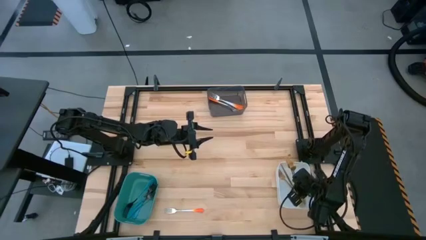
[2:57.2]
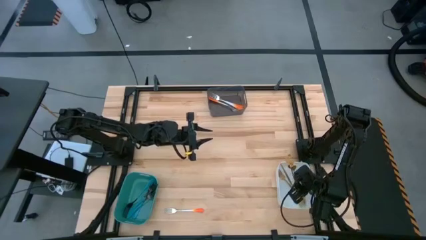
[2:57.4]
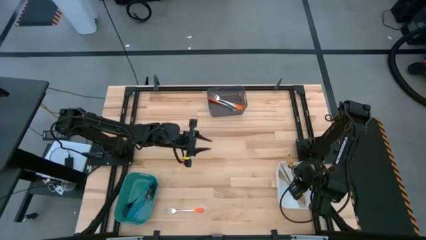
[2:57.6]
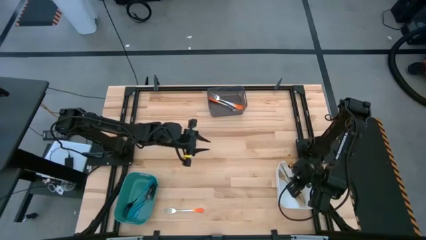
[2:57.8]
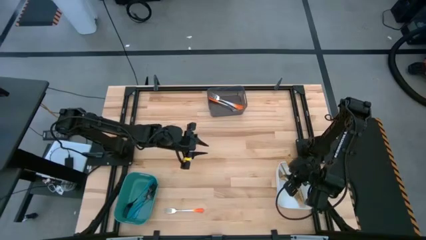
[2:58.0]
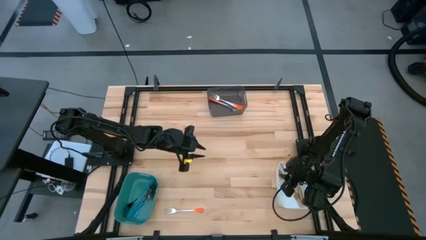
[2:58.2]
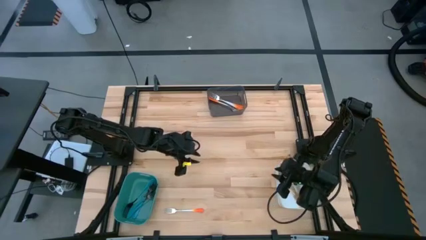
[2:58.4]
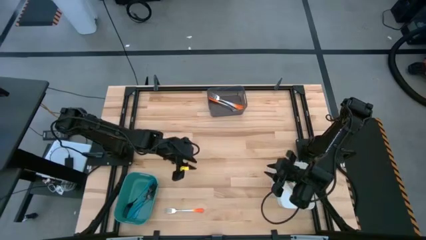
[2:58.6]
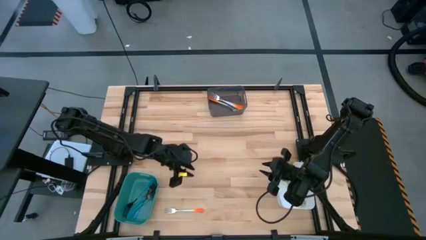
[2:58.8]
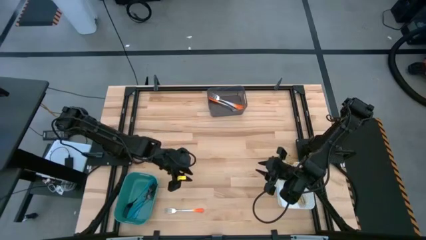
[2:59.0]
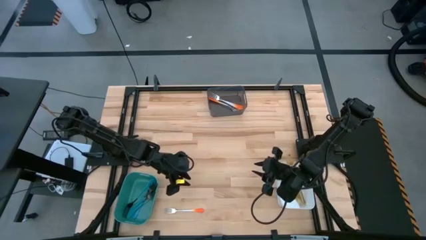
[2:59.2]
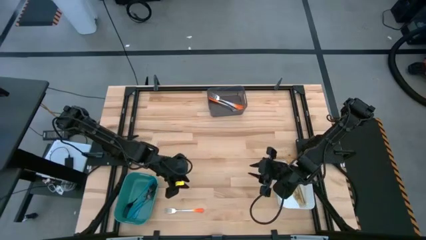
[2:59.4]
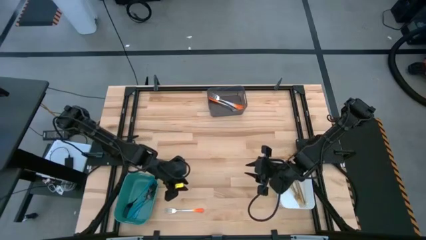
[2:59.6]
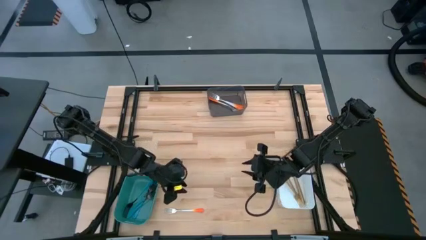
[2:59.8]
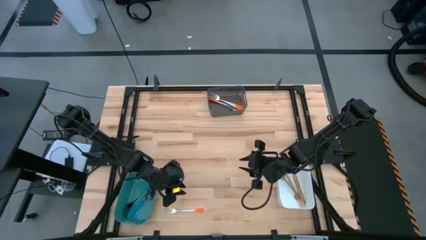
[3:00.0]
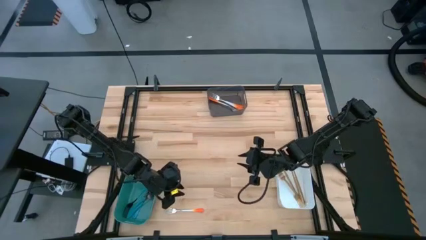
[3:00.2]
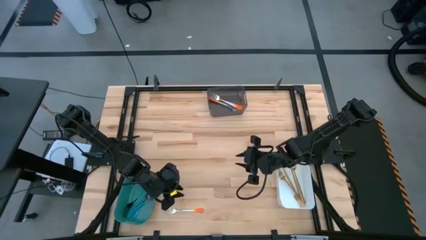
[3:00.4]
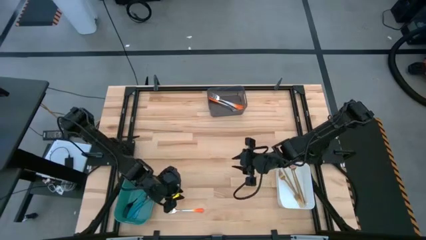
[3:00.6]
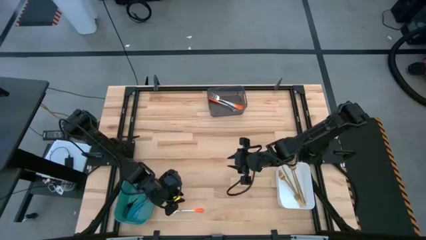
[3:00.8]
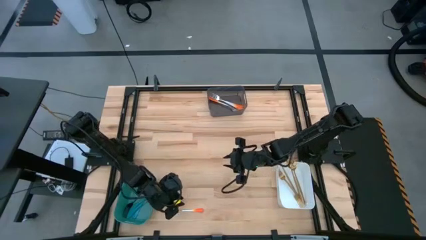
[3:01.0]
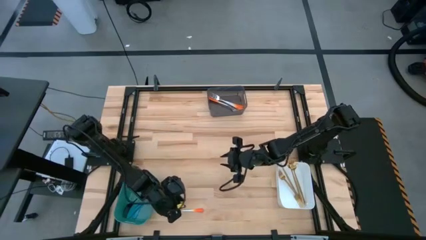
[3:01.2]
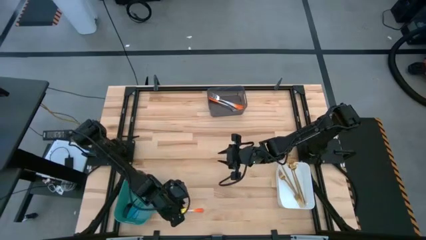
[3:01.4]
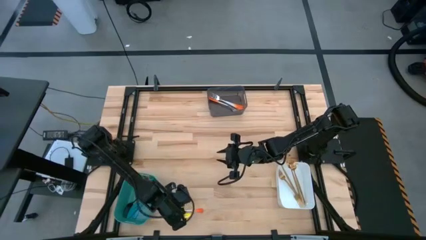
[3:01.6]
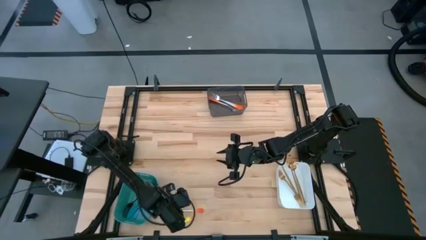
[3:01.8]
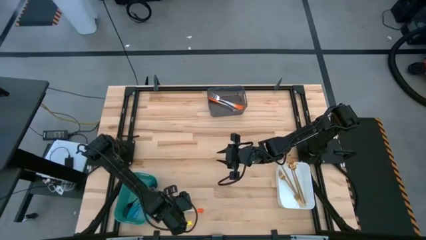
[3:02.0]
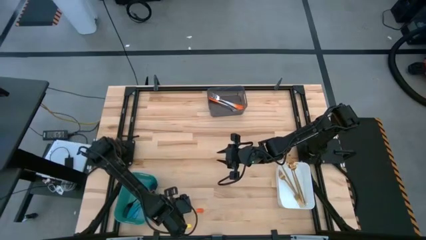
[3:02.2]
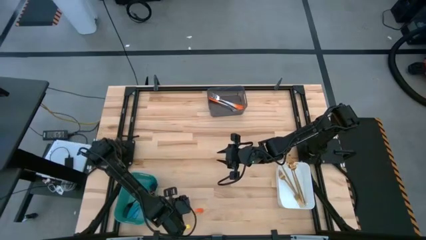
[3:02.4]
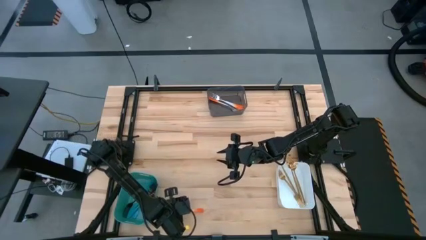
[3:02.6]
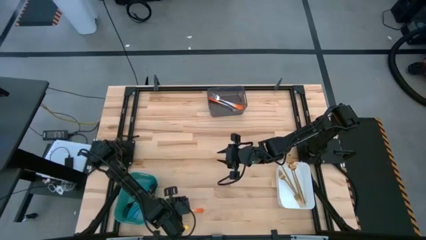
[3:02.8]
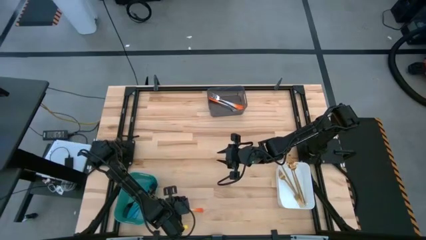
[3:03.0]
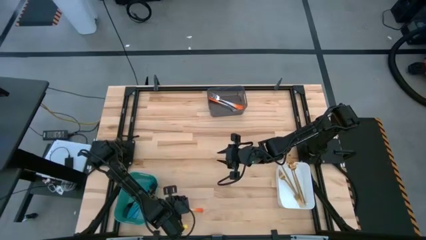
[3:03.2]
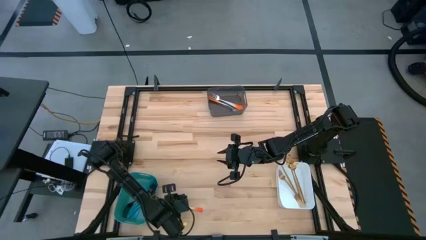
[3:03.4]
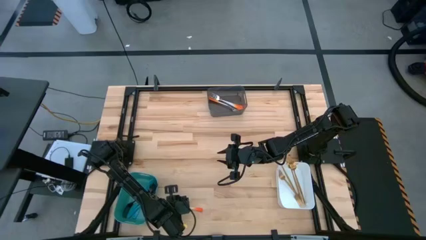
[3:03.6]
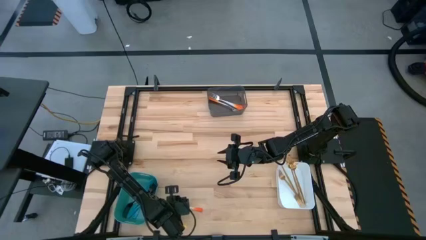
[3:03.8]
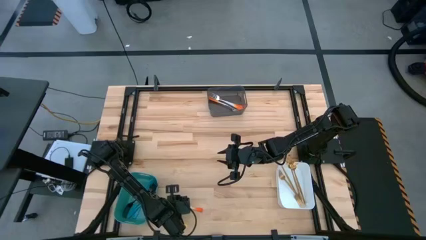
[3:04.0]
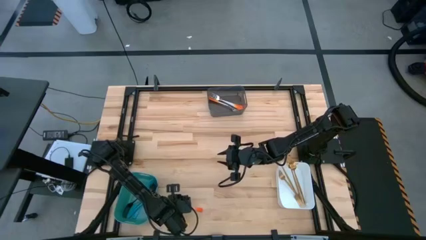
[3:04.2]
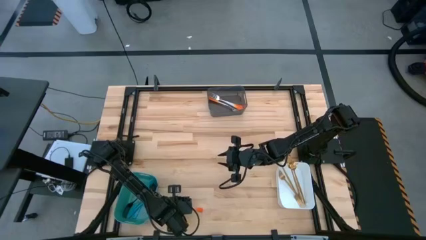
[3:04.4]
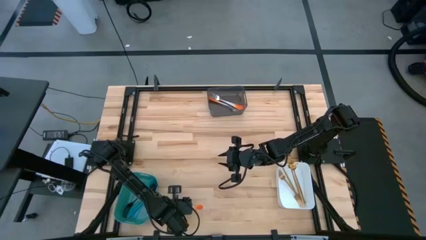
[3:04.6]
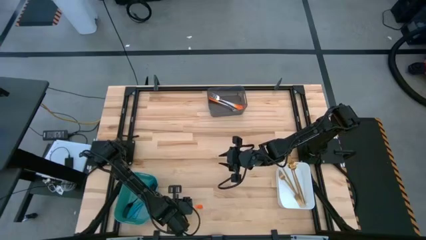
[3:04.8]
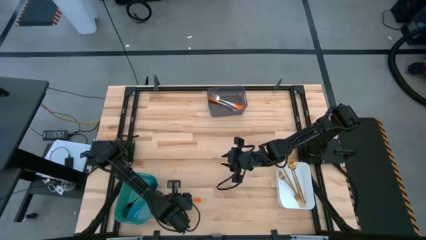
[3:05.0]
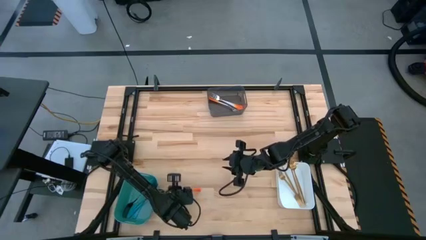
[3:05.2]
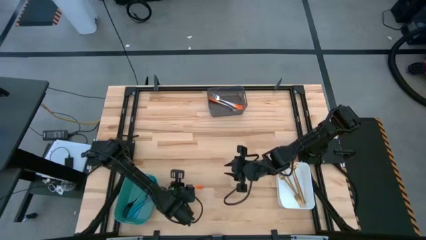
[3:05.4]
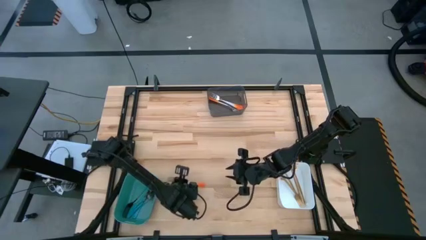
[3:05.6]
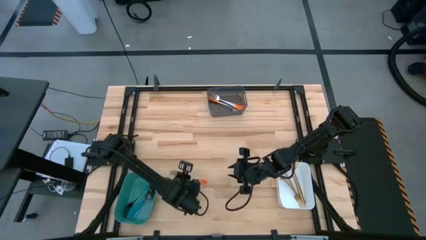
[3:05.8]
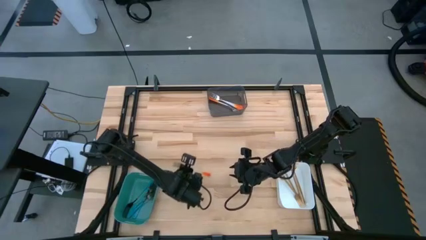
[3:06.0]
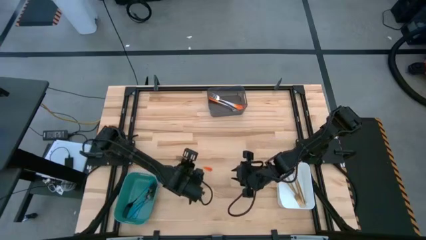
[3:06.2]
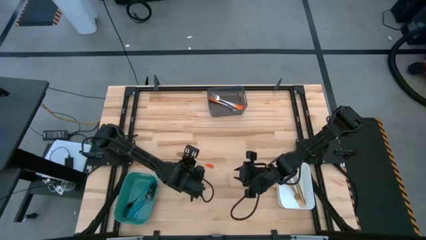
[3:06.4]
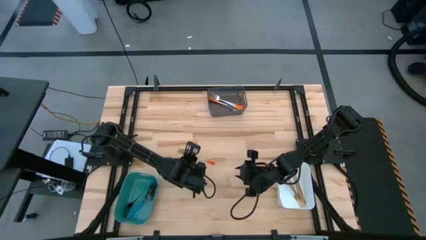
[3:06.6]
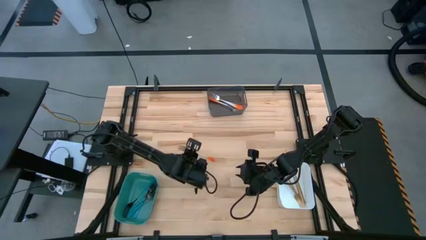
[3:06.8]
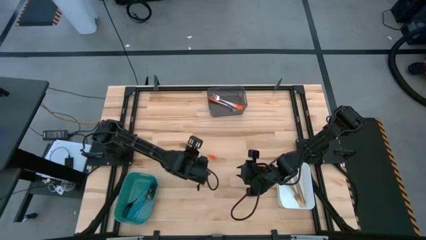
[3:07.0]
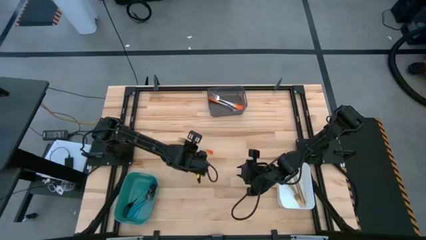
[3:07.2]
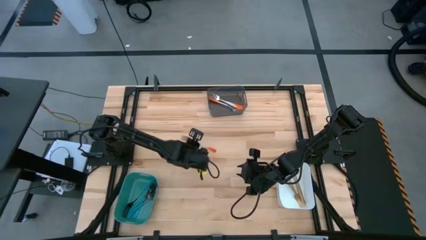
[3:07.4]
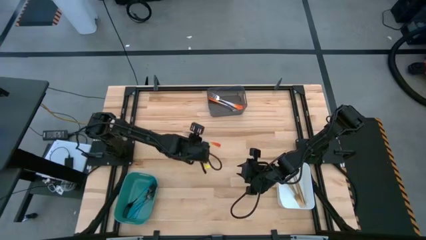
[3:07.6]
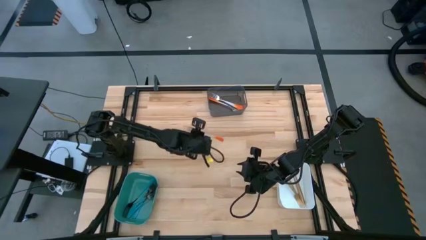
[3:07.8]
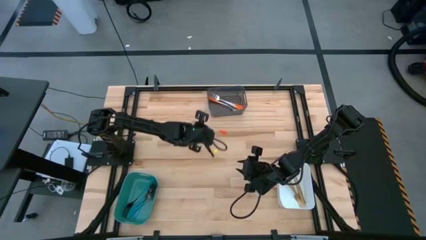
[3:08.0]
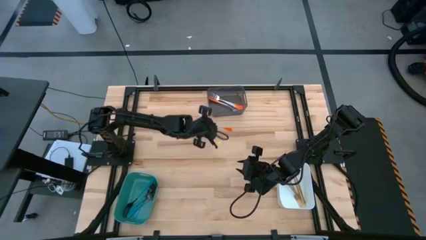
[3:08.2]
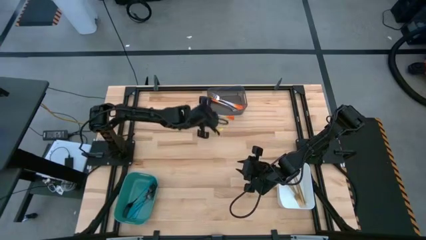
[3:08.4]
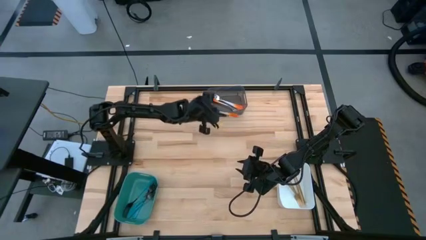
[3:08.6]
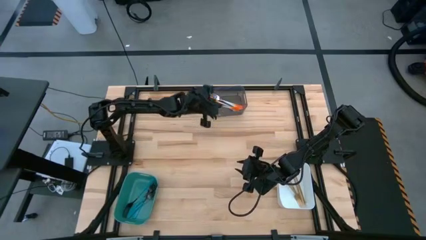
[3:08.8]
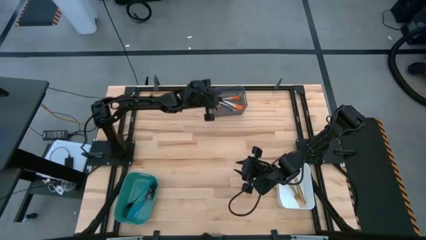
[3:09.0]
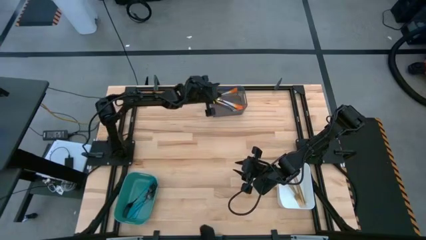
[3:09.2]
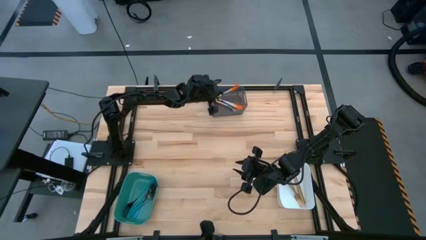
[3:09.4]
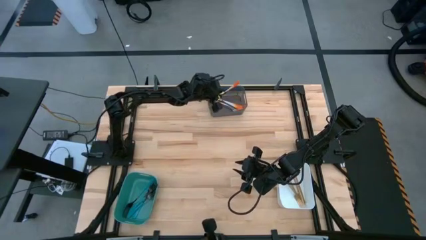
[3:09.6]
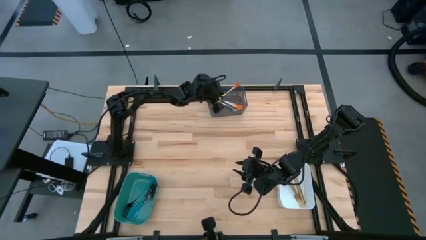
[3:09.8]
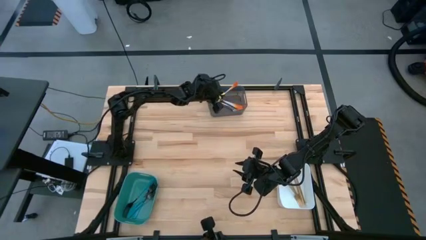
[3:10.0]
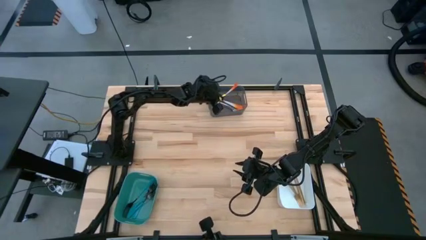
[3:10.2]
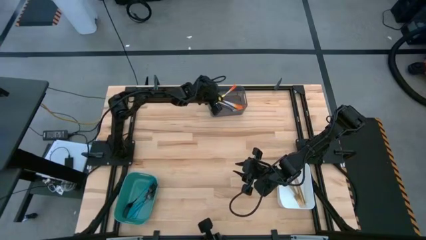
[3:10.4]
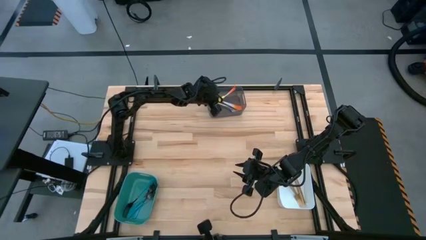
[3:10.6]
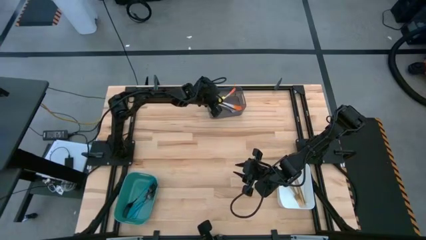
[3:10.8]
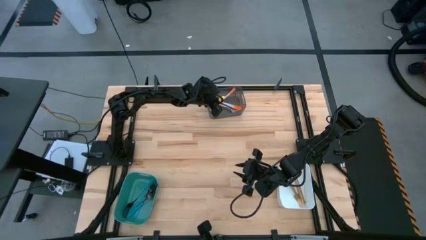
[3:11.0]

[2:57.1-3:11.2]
Task: Sort silverware by color (type)
Put the orange fork into the black bin
